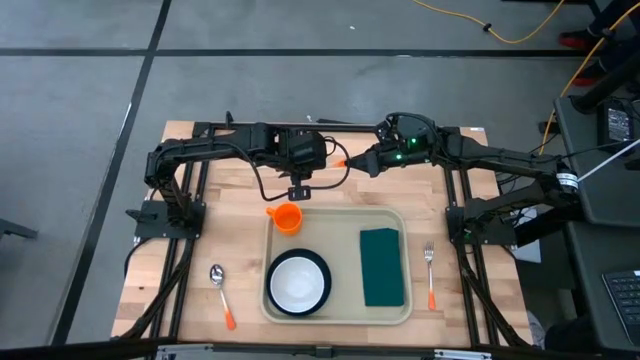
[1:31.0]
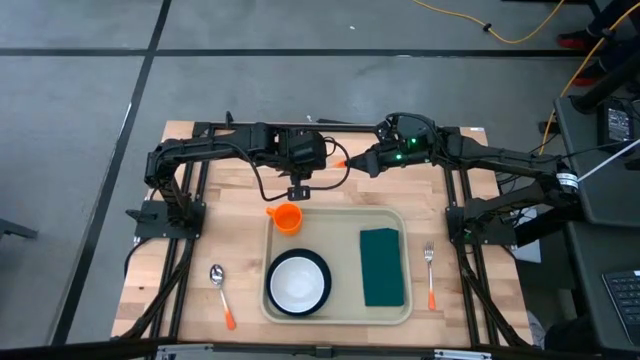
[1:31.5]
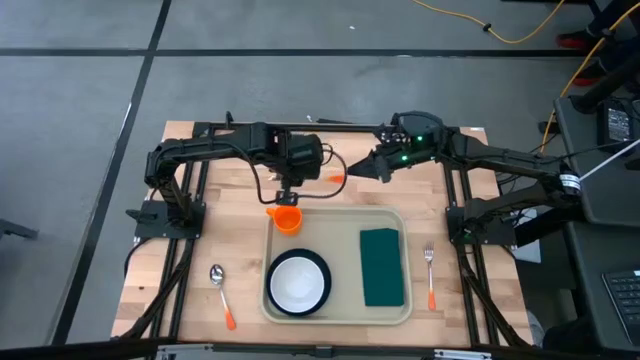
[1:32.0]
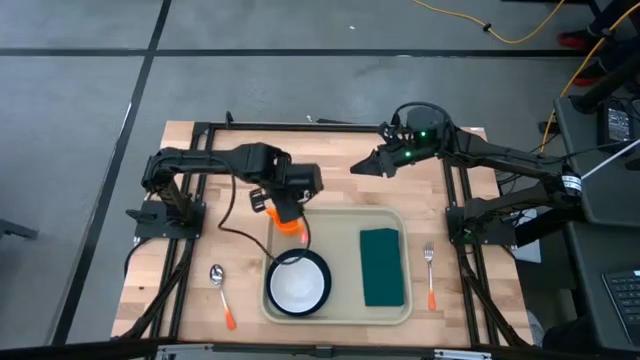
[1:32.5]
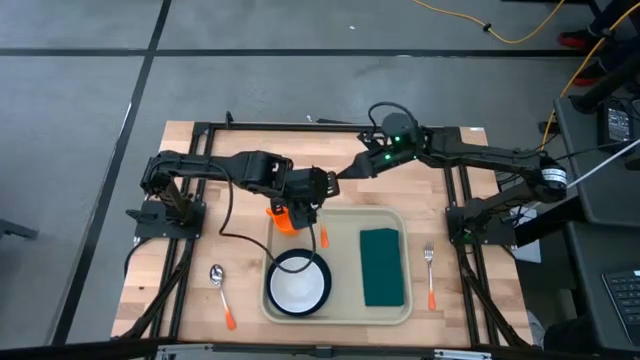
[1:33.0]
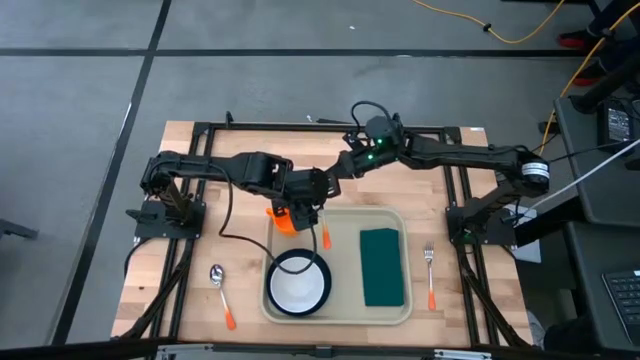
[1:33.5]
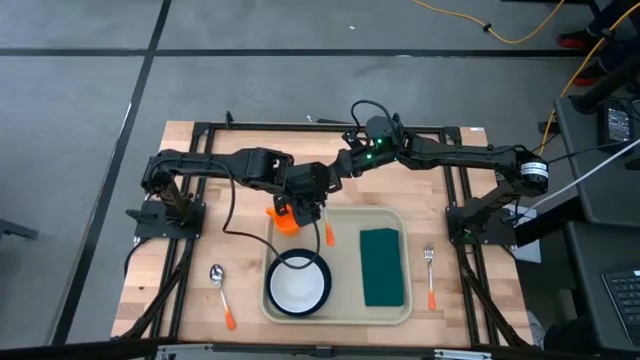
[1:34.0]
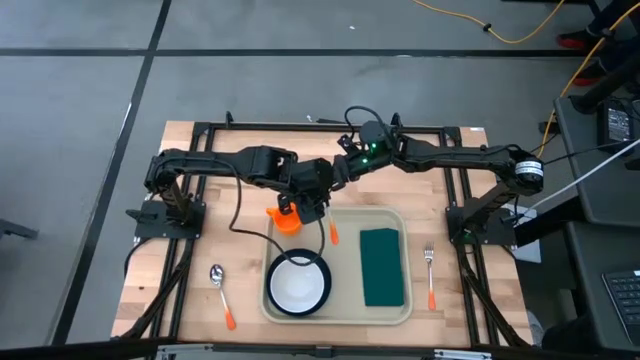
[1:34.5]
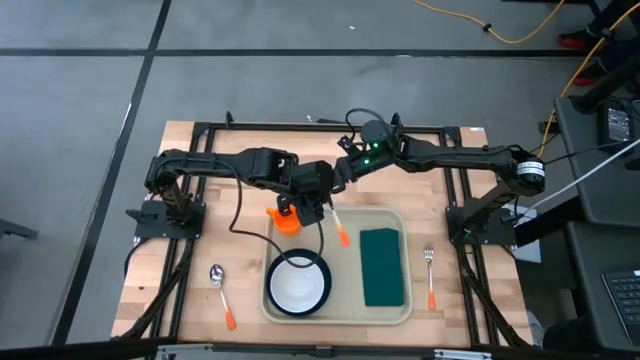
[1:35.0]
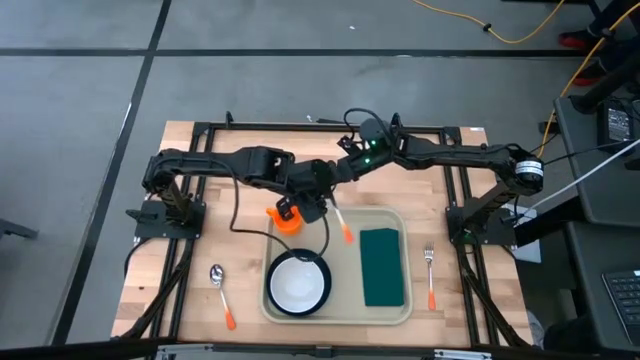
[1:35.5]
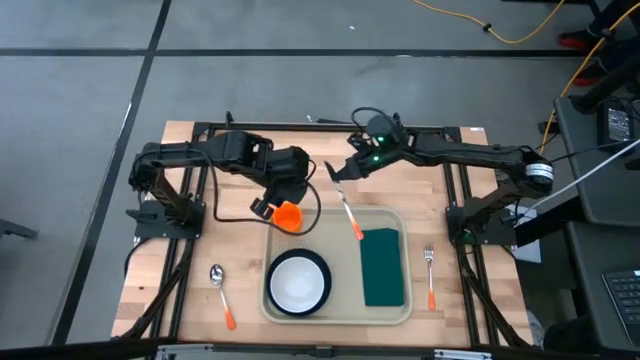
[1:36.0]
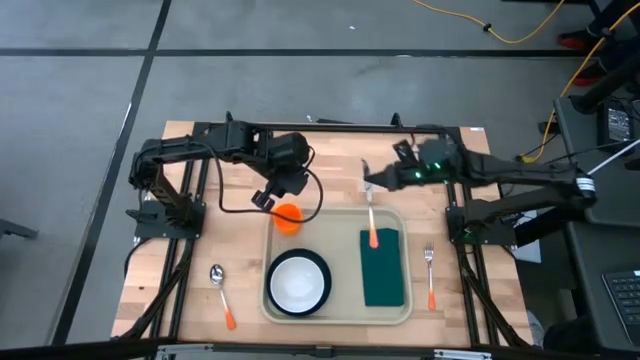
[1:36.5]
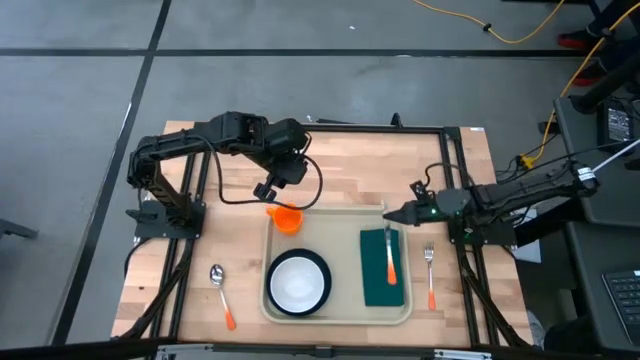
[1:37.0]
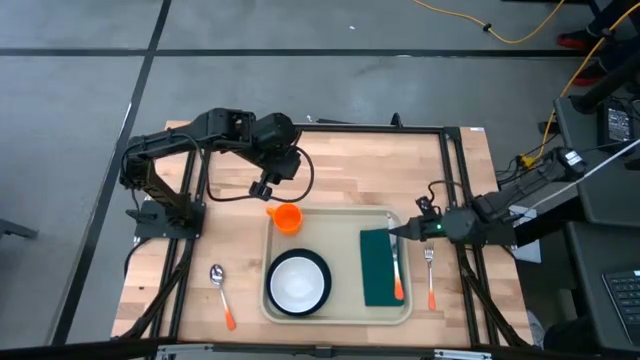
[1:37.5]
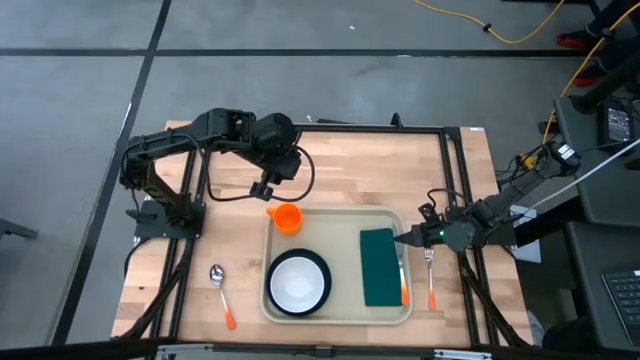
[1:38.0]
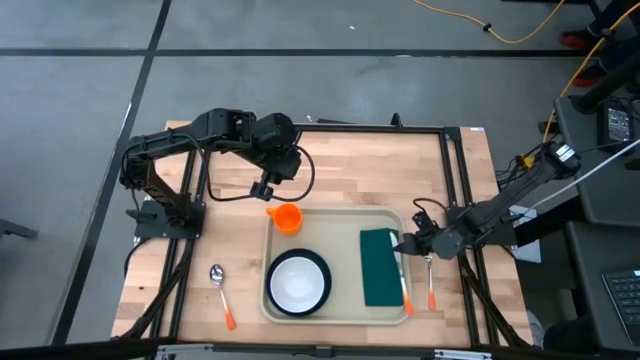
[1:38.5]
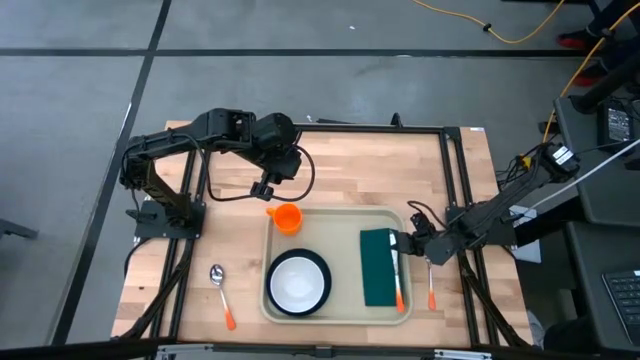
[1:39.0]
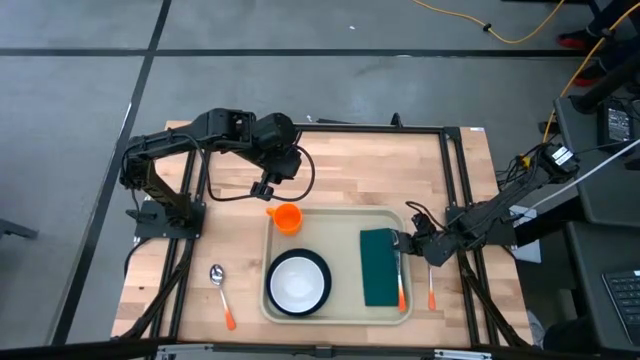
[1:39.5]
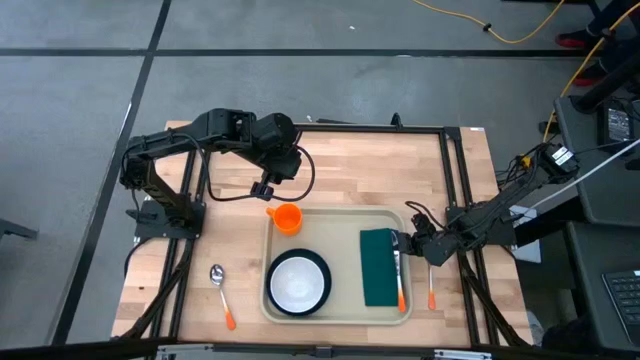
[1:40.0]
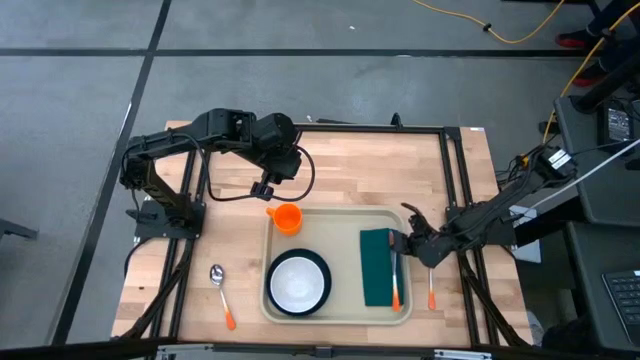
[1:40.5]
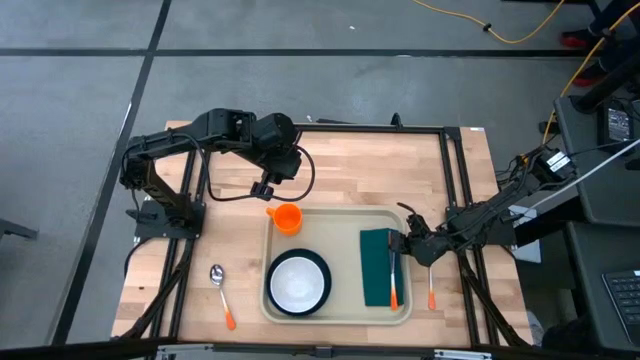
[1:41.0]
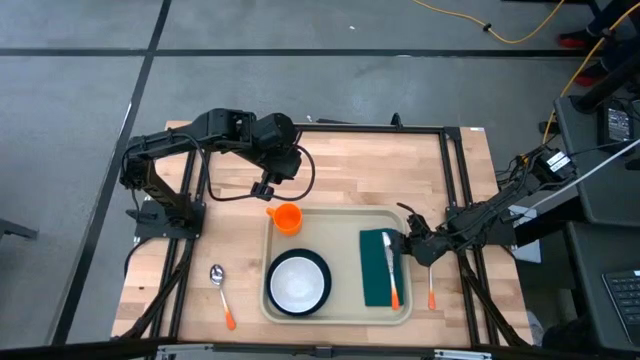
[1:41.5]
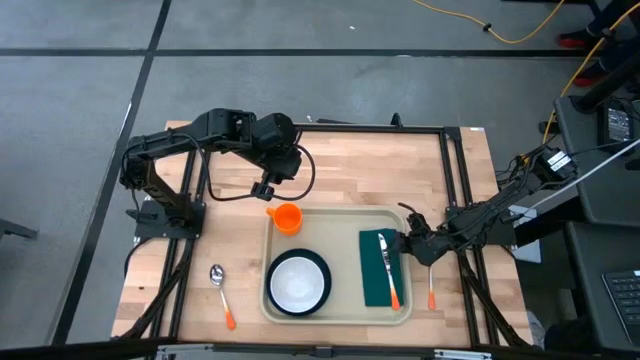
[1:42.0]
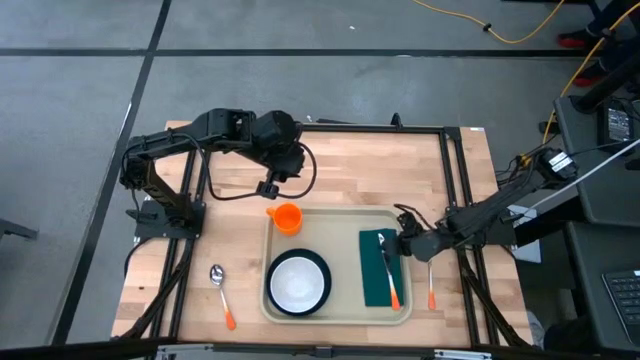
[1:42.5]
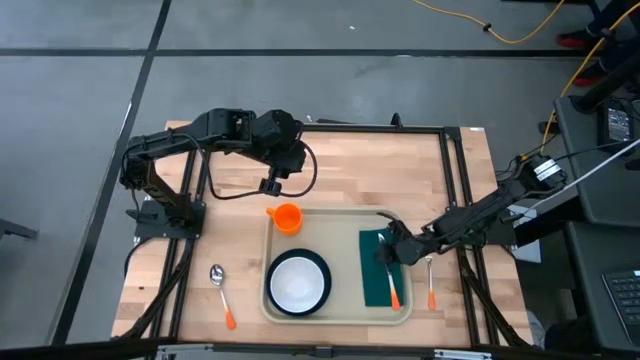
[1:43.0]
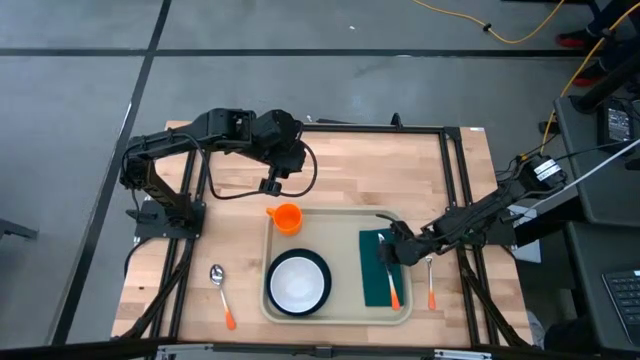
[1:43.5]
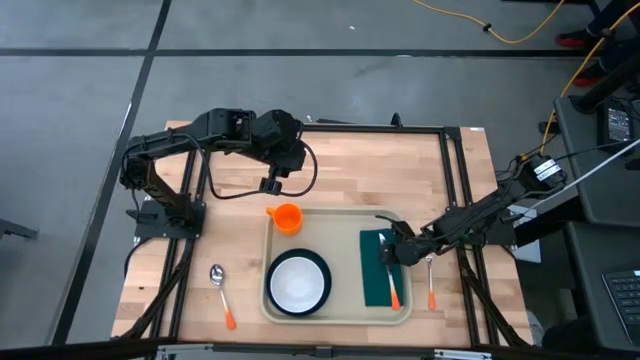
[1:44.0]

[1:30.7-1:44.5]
Task: Set up tray
Put the orange knife on the green napkin

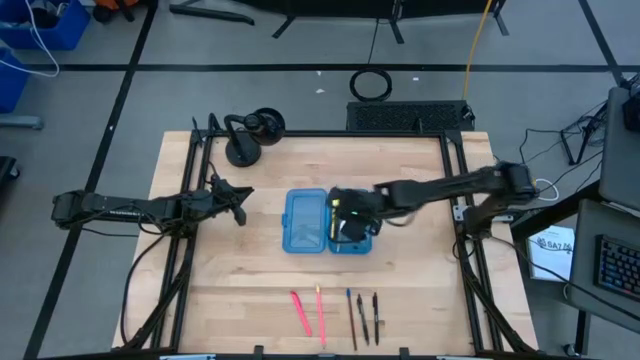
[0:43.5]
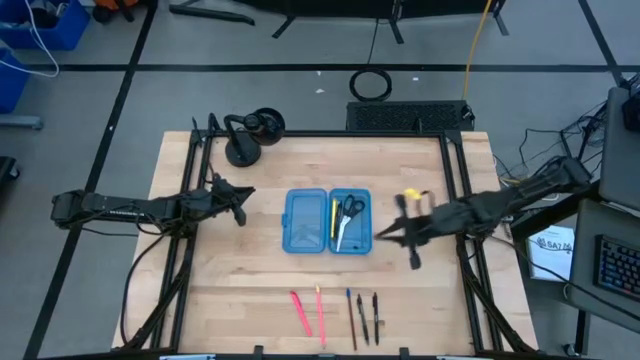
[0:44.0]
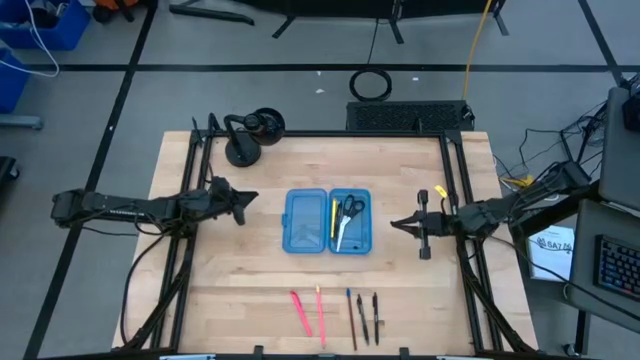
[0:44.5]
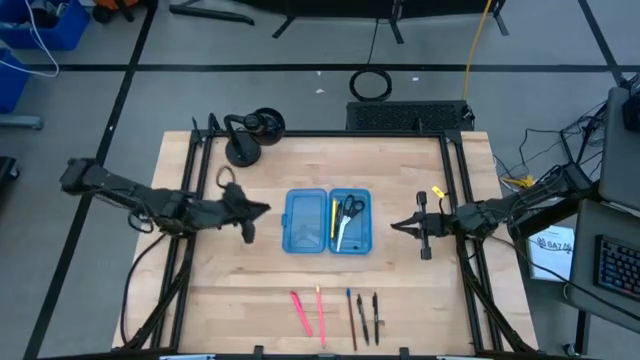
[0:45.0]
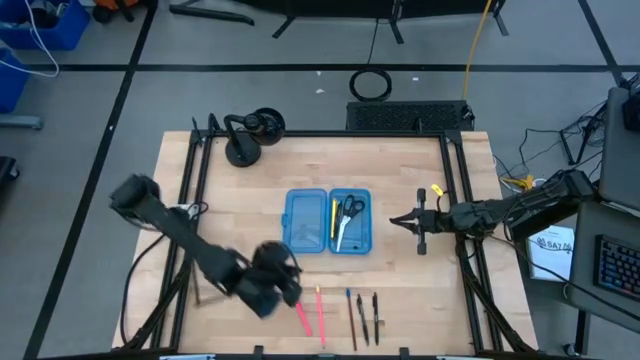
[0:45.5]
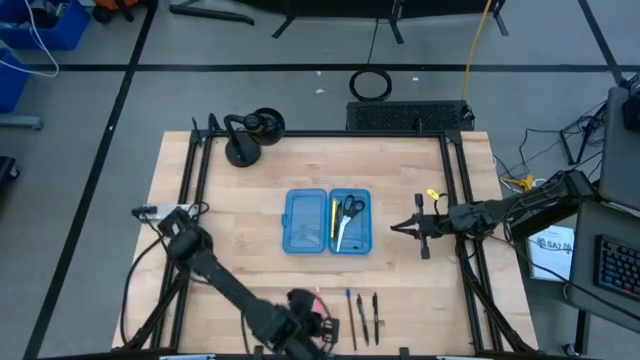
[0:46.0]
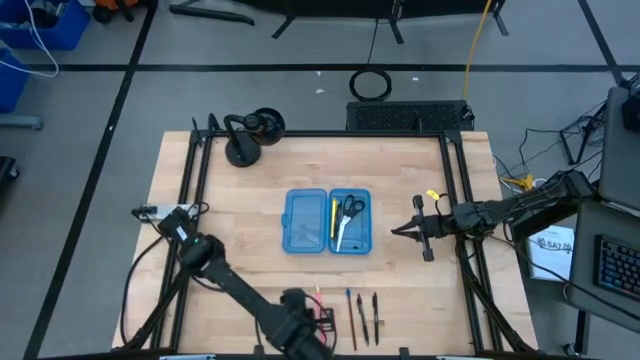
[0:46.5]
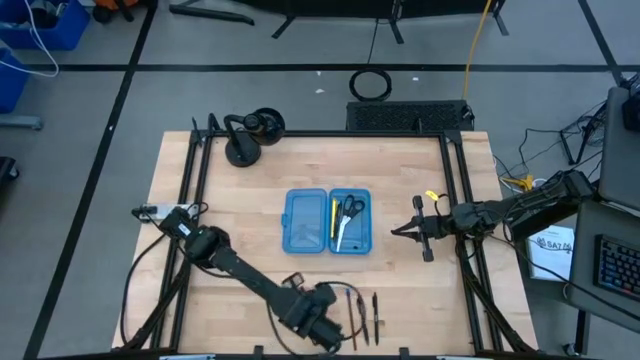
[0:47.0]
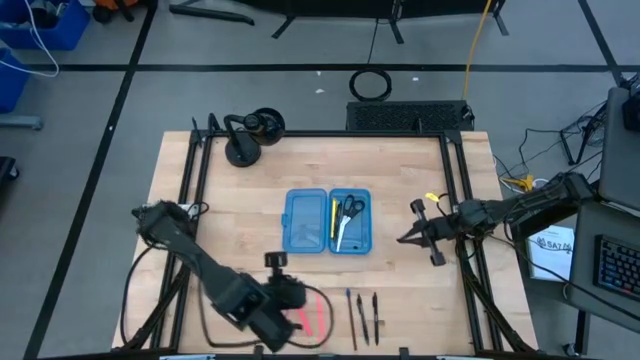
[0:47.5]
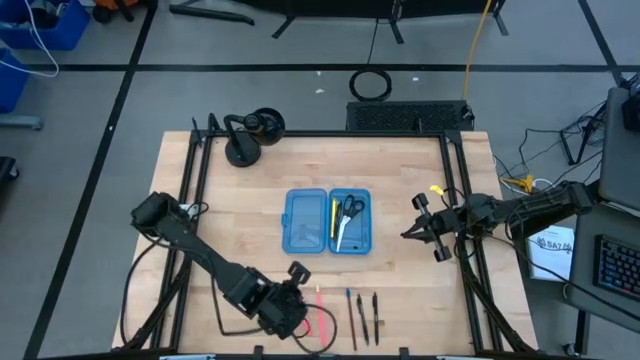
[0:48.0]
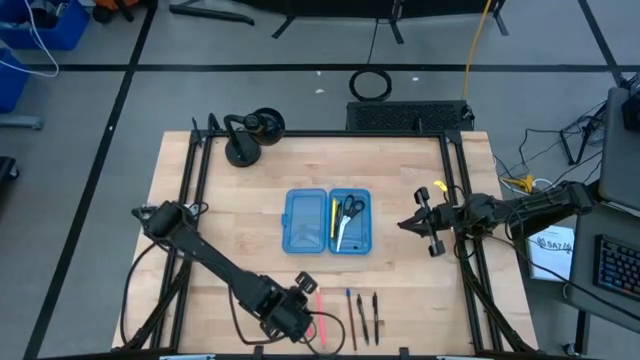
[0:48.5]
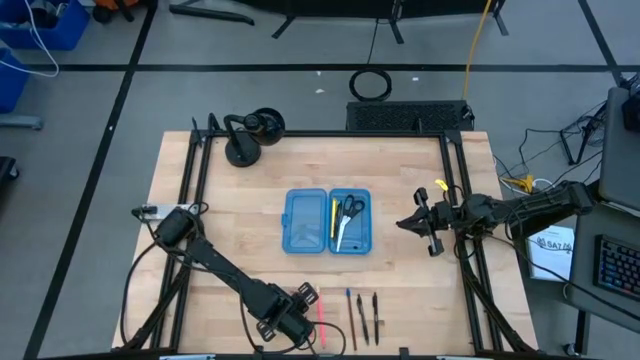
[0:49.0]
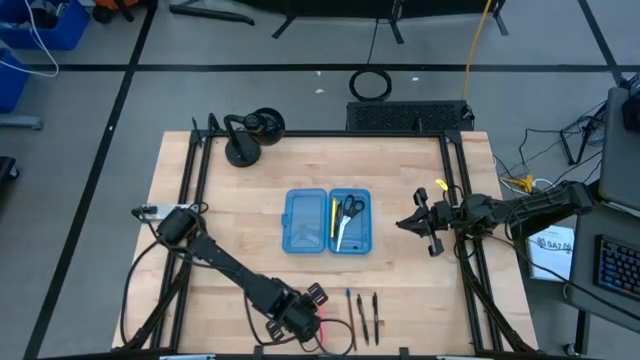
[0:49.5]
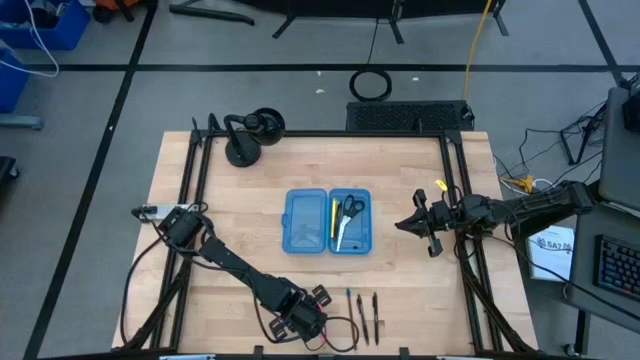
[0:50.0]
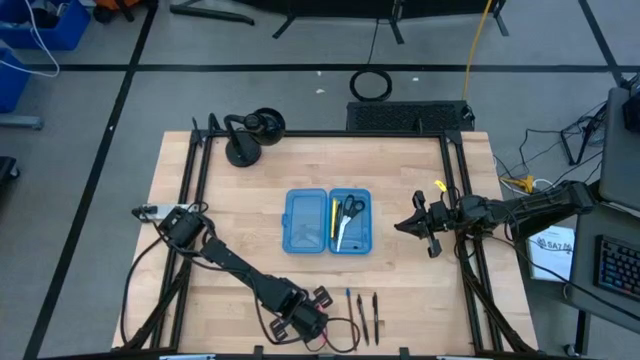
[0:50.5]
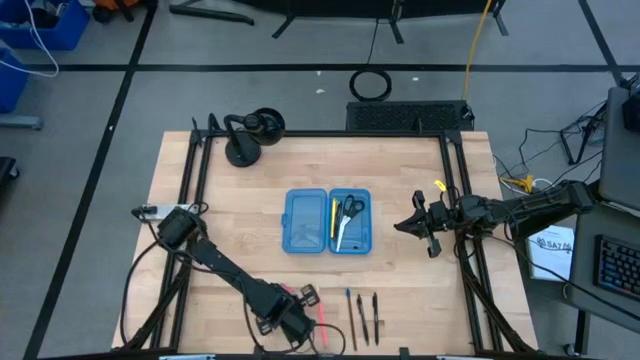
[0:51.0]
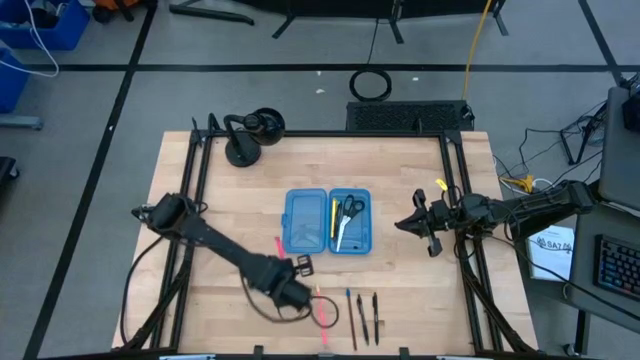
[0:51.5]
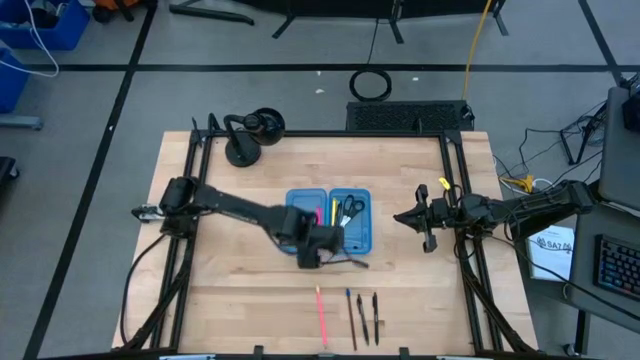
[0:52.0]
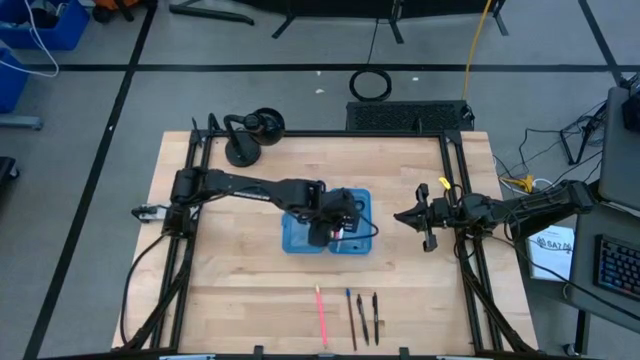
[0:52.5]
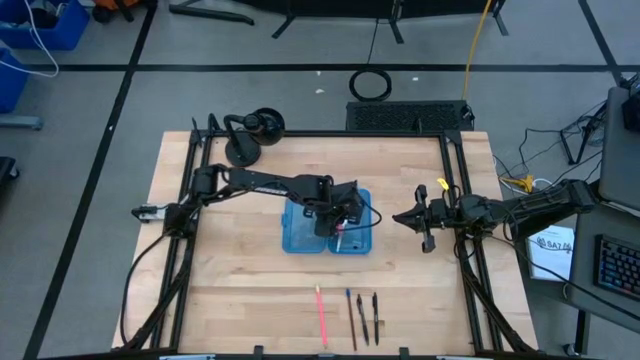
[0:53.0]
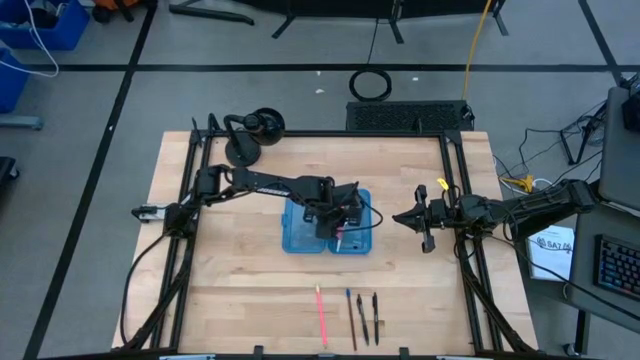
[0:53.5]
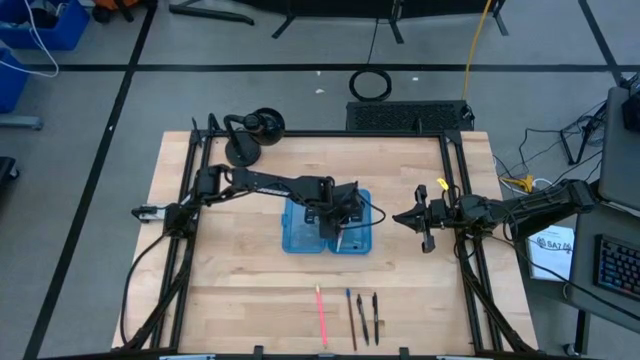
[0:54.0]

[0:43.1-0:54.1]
Task: Pick & place school supplies into a supply box
Put the pink pen into the blue supply box
